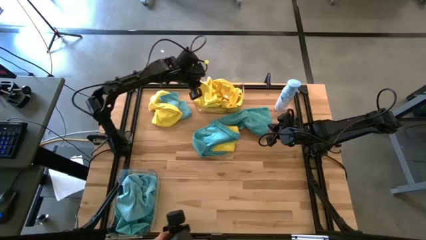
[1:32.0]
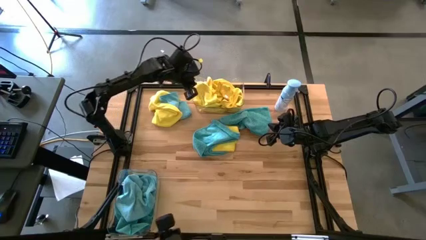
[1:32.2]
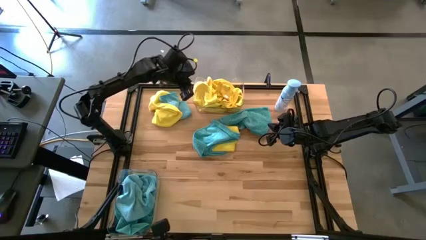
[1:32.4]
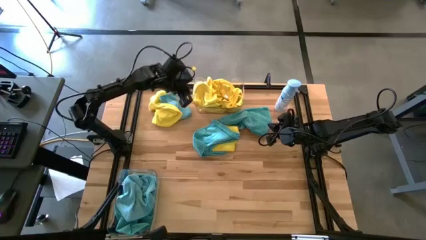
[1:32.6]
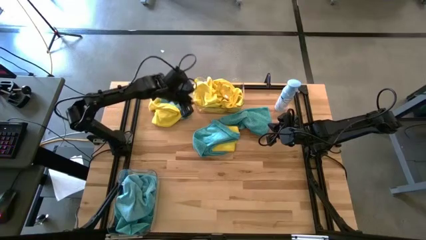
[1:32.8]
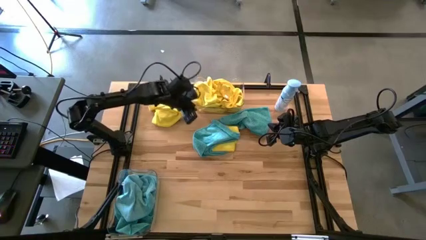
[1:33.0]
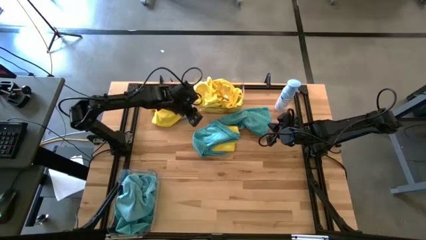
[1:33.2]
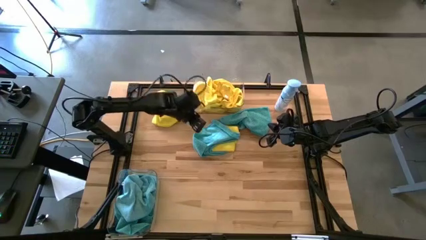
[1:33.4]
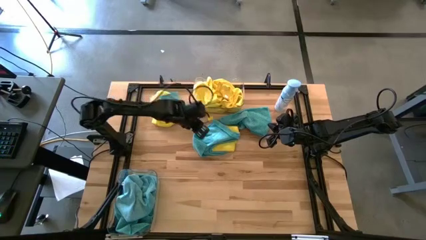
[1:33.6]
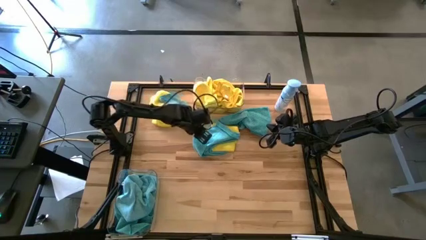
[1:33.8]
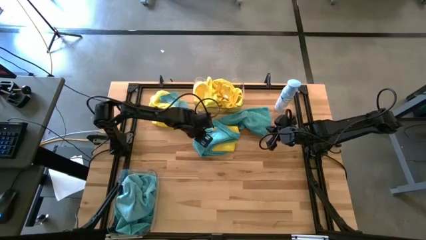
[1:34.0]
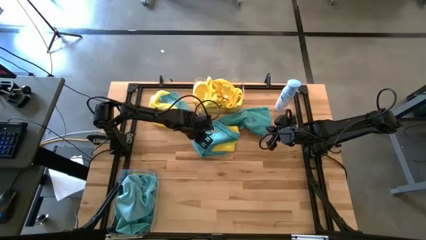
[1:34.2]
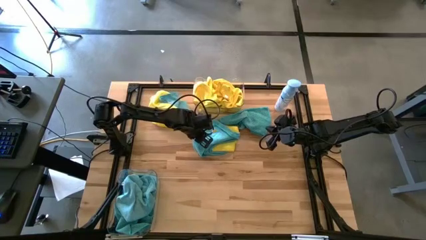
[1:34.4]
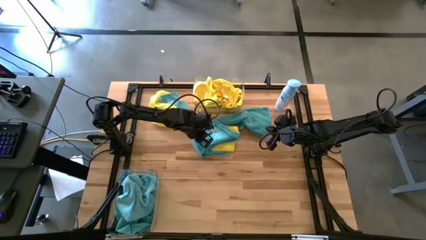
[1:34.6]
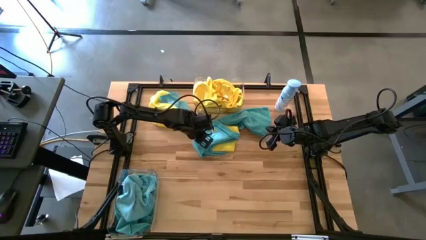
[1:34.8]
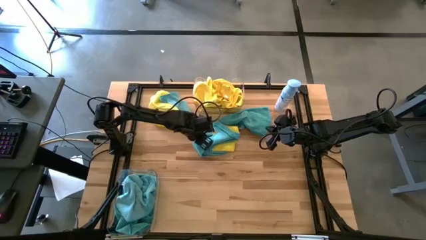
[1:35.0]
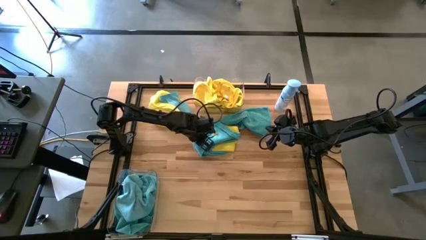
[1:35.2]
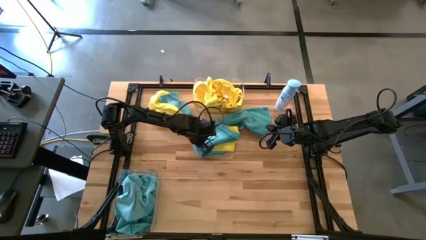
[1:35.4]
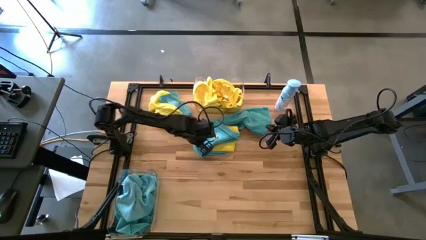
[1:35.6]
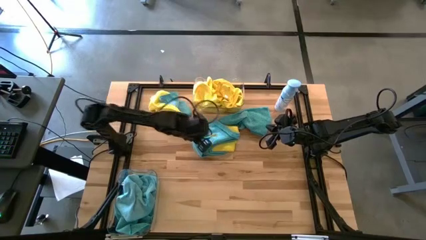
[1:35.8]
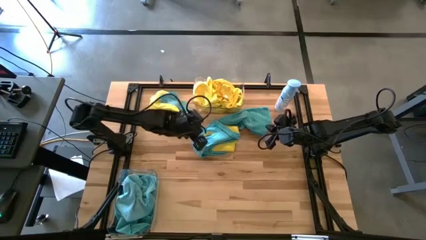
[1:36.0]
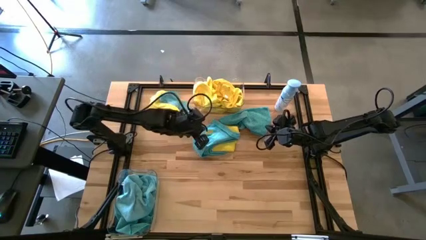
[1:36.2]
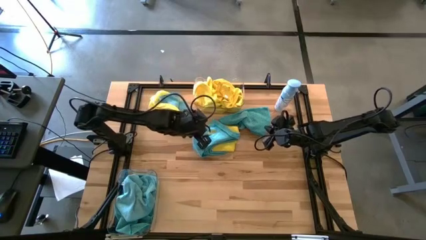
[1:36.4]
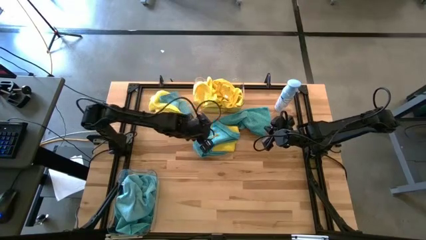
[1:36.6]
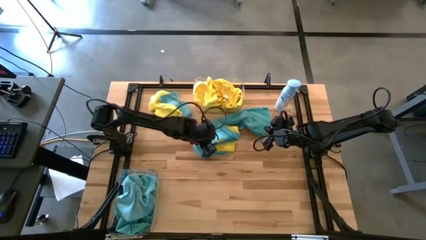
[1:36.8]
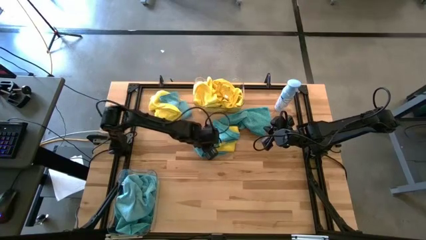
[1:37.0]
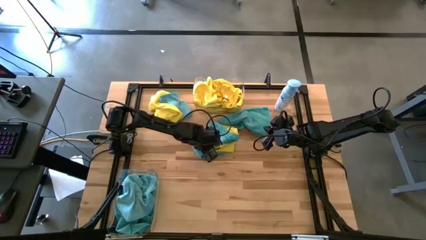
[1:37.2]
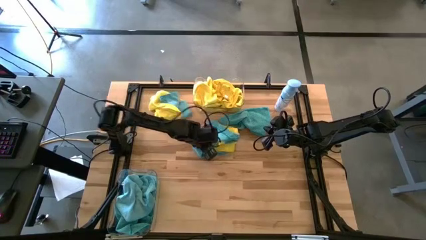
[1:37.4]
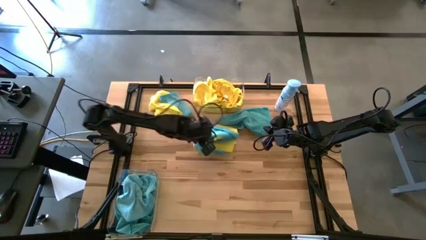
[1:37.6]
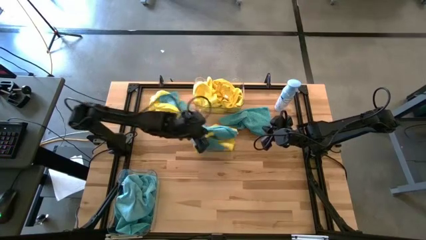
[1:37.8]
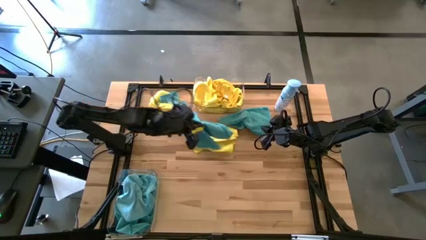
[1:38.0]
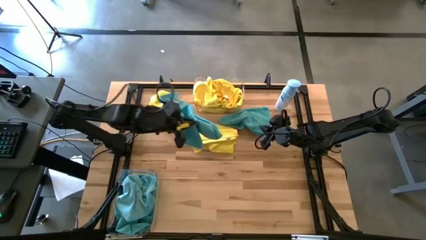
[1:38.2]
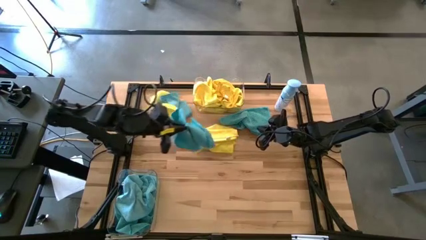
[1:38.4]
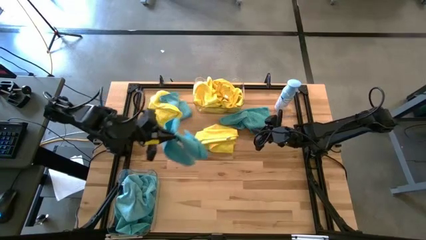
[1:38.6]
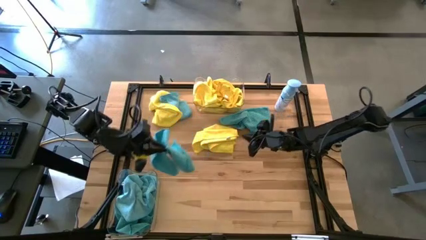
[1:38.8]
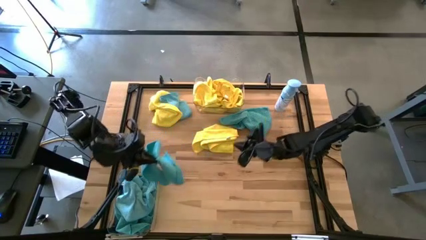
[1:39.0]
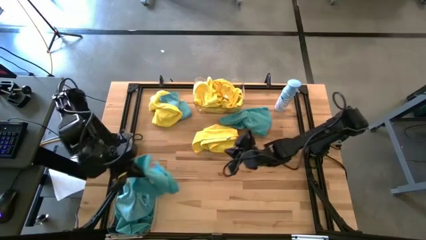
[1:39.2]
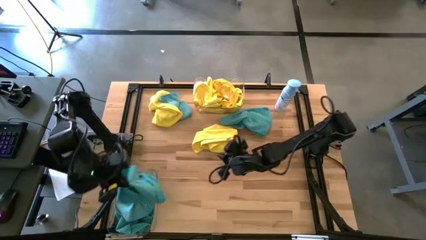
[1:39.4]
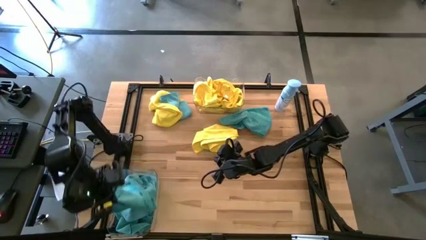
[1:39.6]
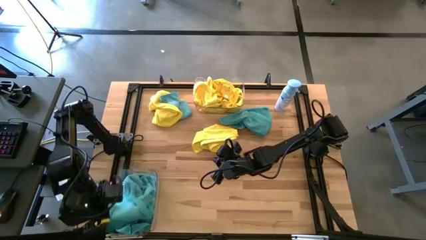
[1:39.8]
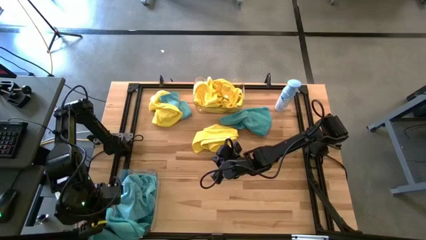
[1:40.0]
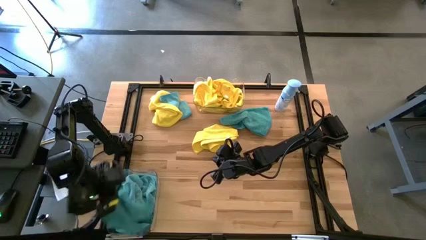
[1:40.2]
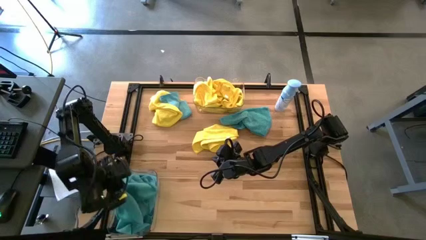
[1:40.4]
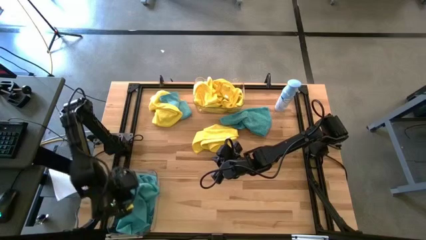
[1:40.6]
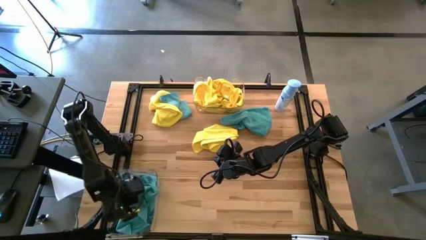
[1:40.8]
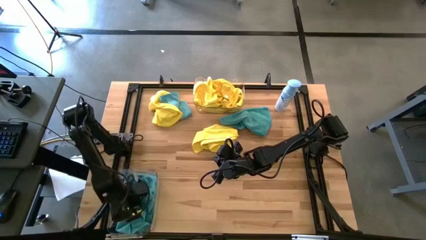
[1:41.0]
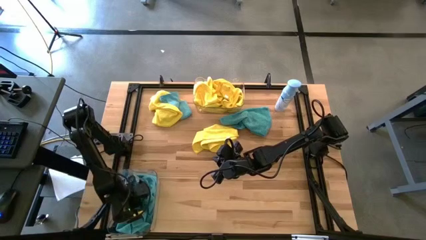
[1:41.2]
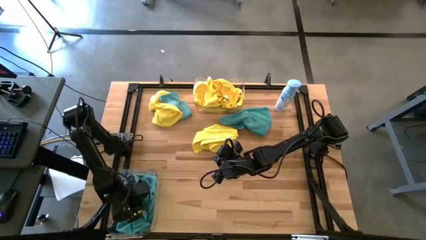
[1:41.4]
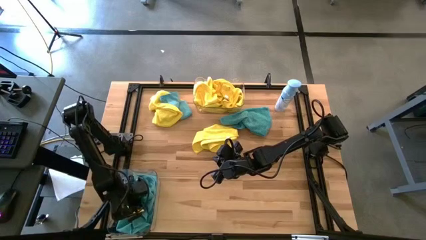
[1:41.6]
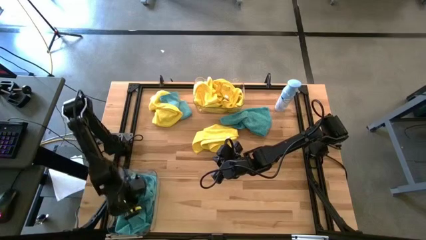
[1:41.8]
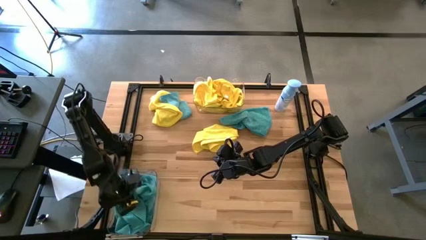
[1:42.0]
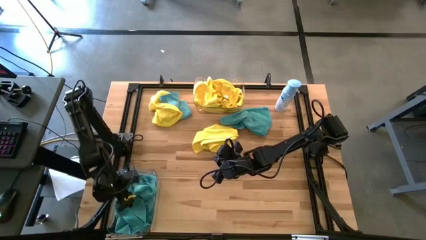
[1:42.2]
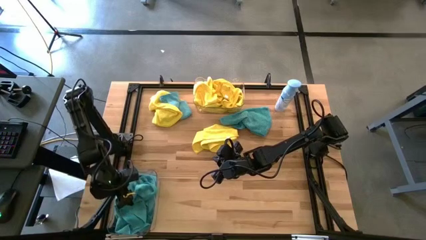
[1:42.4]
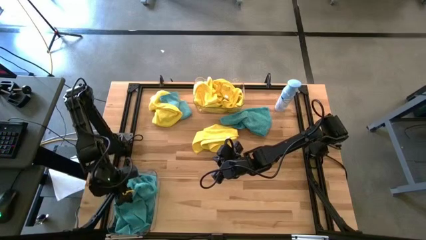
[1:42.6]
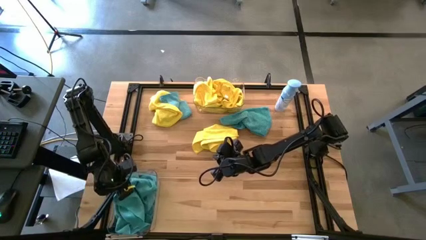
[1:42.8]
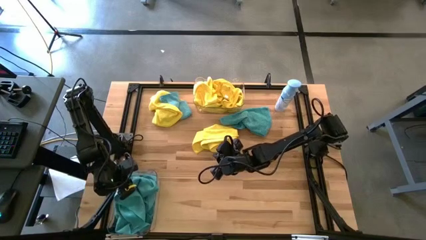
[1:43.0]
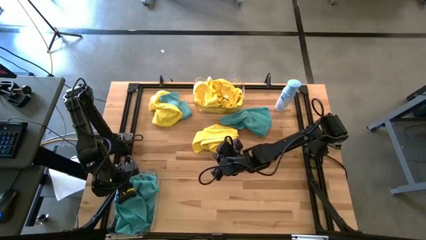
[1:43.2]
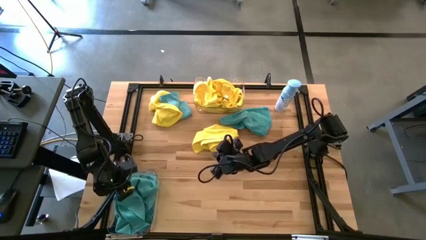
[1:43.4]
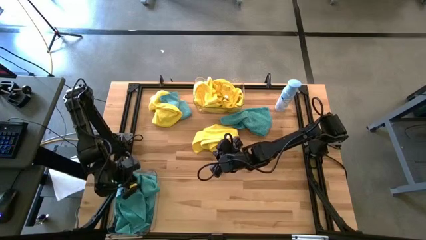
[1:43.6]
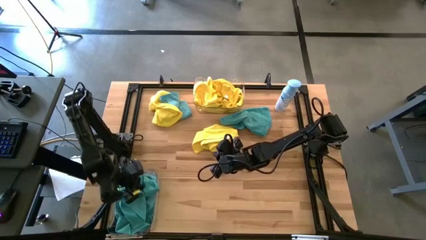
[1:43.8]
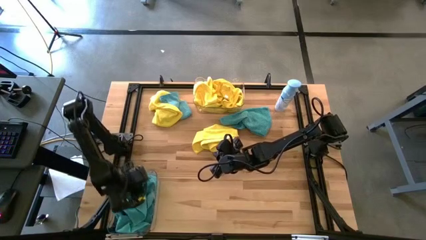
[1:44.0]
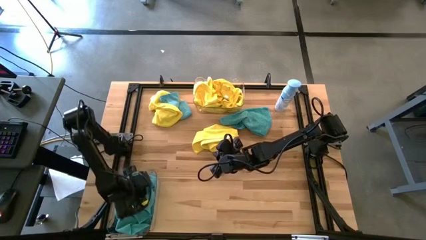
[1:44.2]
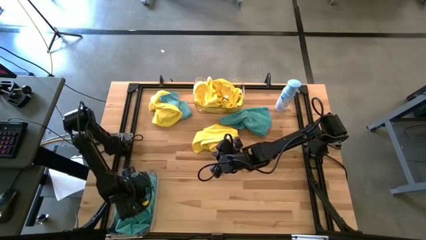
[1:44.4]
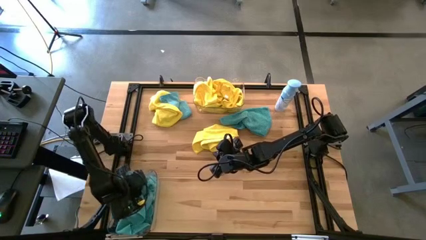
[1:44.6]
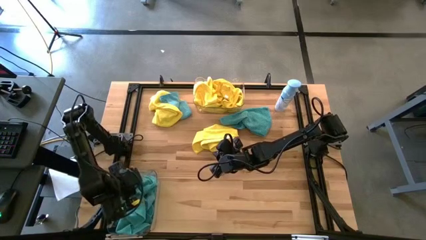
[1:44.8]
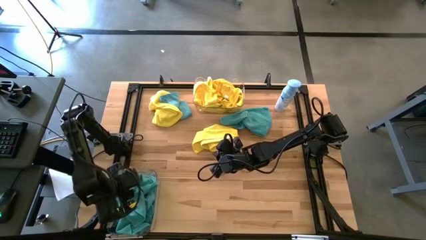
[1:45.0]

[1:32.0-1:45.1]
Task: Sort microfiber towel by color & place in baskets
Put the blue microfiber towel into the bottom transparent bin

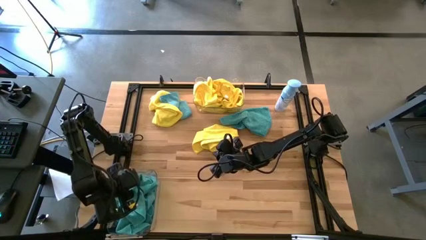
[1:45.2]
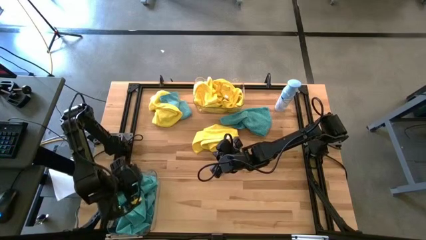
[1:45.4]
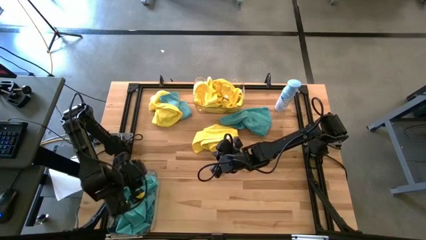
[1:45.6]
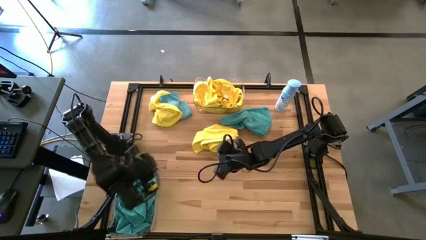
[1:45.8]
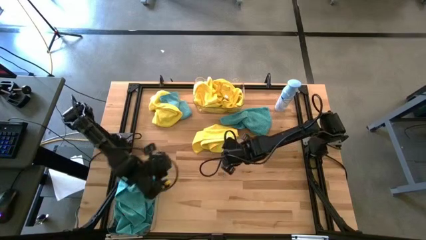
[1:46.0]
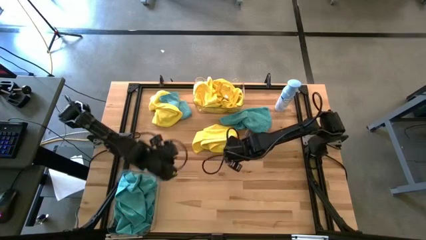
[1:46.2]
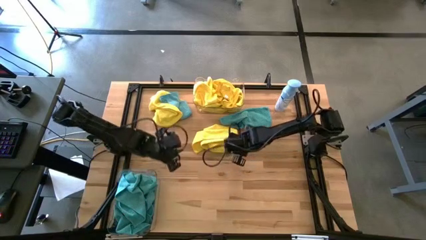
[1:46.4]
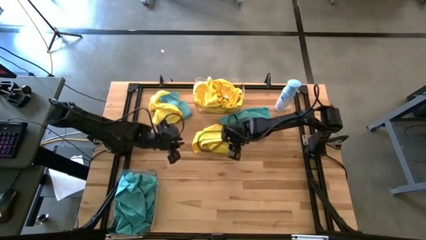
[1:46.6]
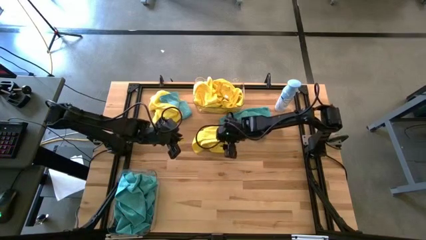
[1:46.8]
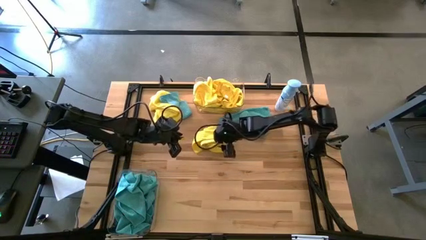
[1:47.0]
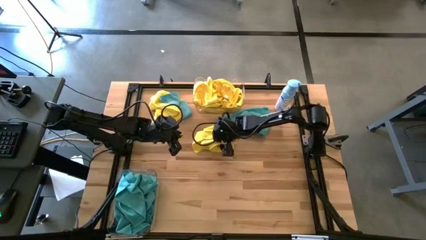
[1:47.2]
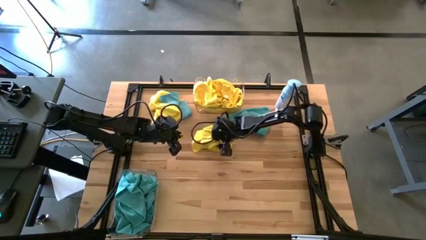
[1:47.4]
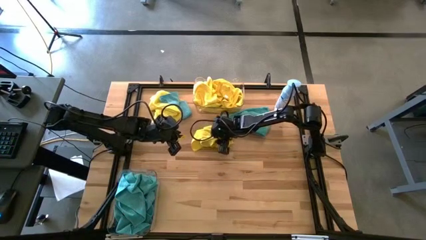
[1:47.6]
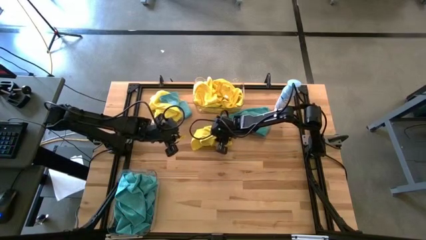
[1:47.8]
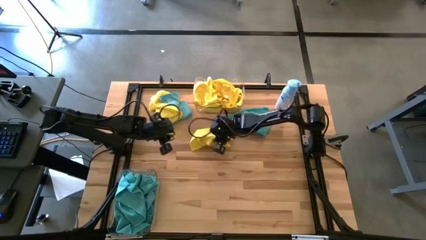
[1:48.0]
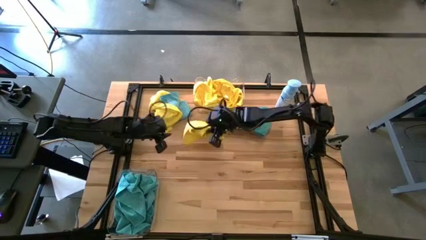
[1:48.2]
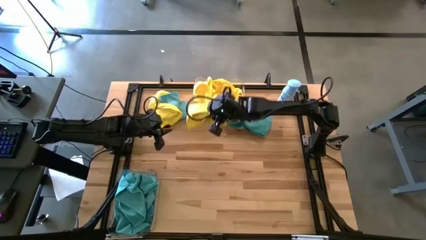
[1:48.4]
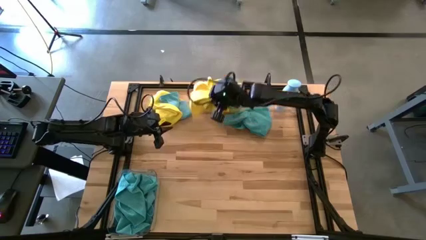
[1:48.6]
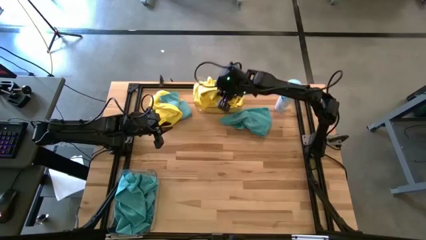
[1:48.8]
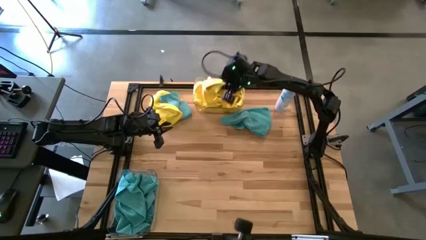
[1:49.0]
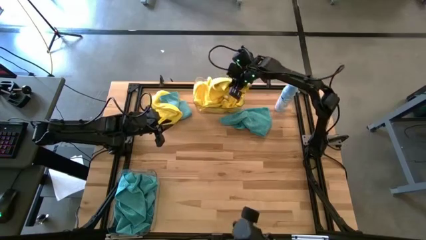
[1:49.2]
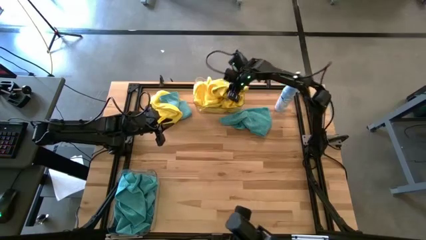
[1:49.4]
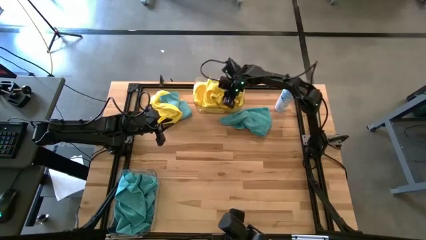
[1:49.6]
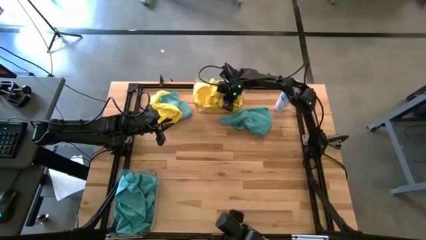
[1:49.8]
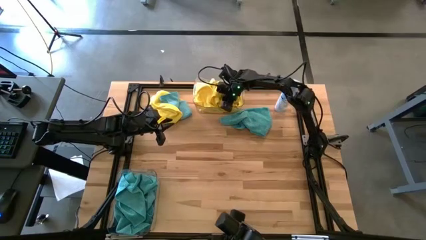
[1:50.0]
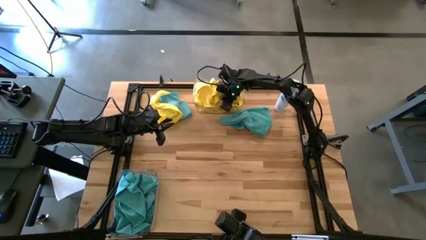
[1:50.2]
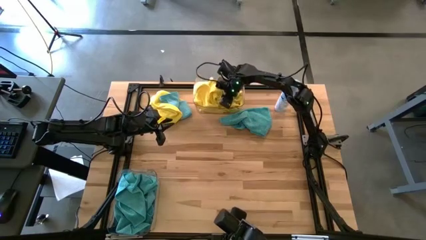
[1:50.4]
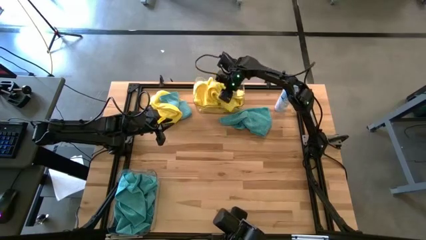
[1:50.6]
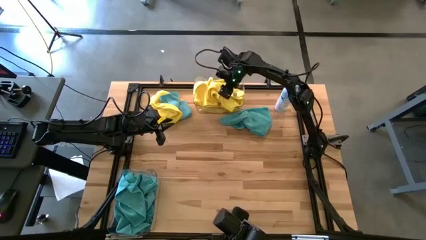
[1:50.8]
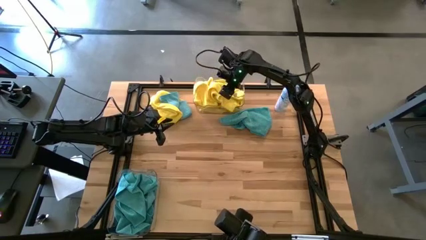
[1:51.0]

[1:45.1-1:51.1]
Put the yellow microfiber towel into the top transparent bin
